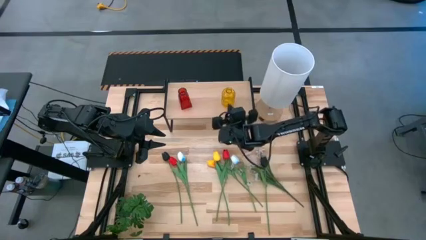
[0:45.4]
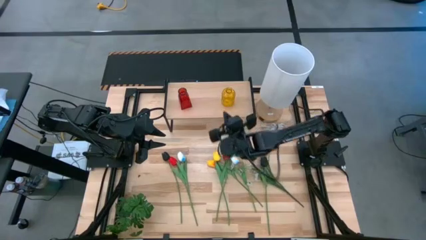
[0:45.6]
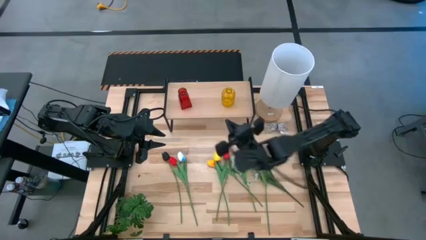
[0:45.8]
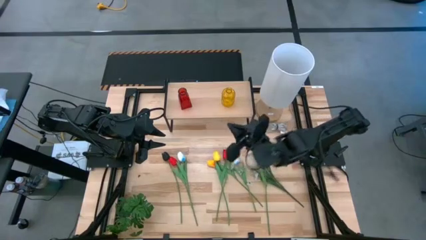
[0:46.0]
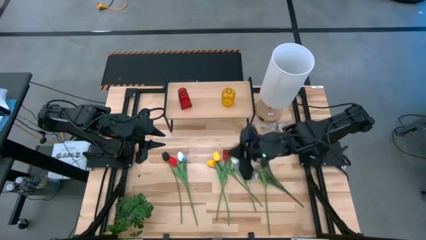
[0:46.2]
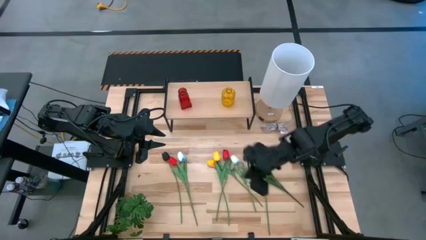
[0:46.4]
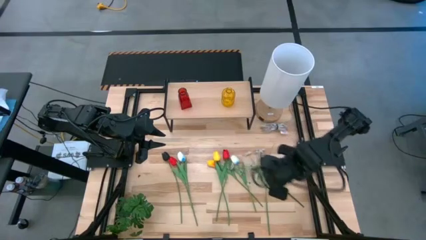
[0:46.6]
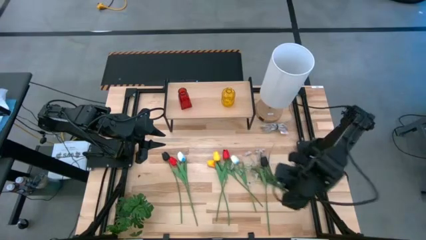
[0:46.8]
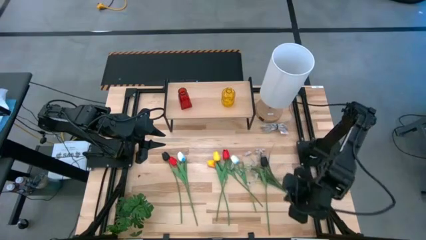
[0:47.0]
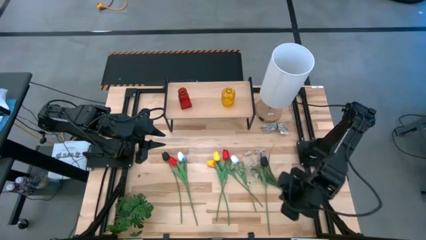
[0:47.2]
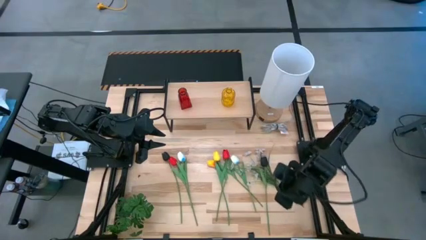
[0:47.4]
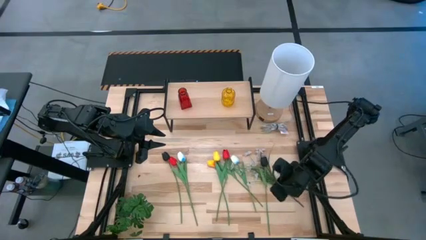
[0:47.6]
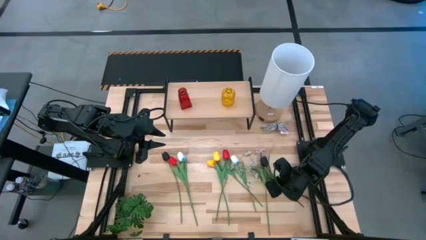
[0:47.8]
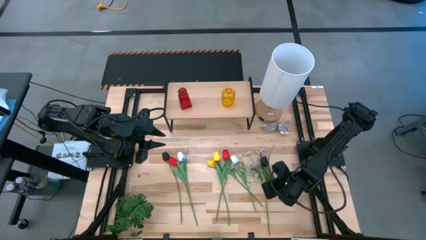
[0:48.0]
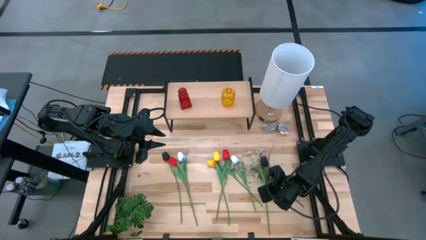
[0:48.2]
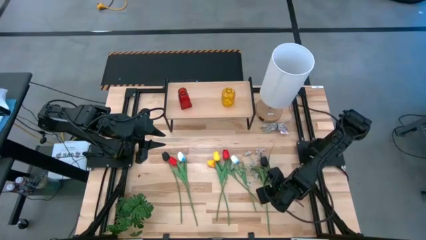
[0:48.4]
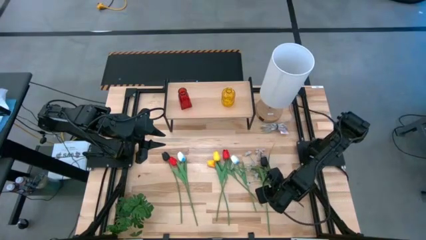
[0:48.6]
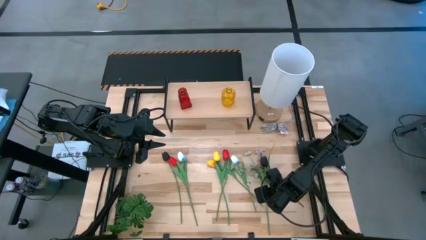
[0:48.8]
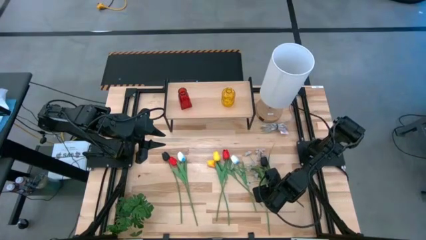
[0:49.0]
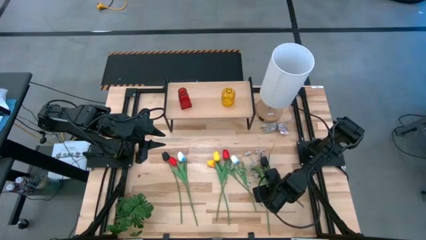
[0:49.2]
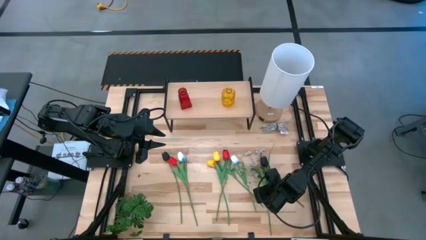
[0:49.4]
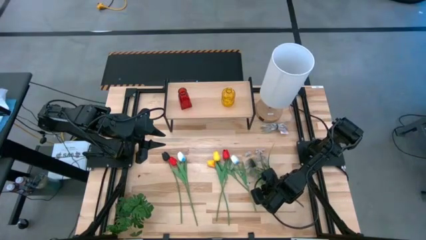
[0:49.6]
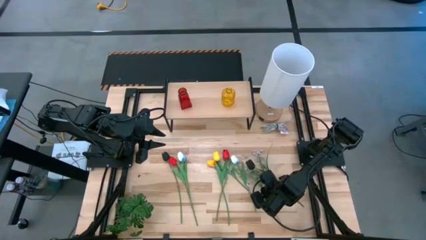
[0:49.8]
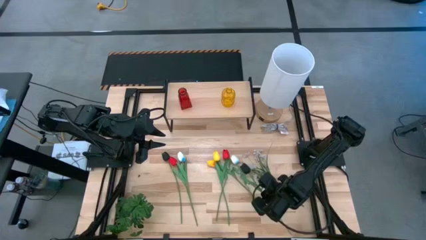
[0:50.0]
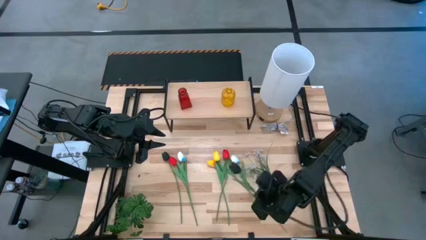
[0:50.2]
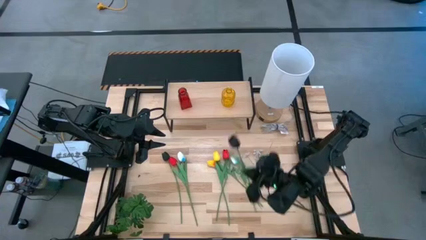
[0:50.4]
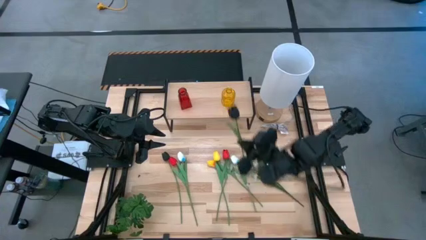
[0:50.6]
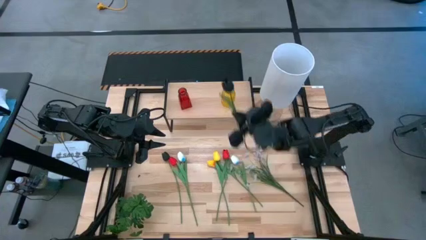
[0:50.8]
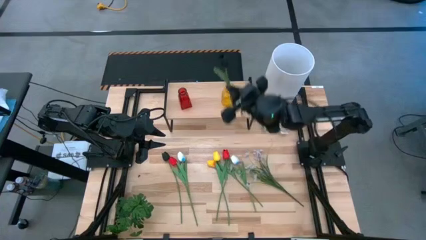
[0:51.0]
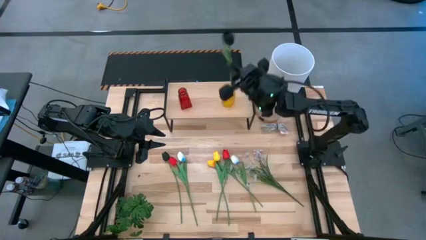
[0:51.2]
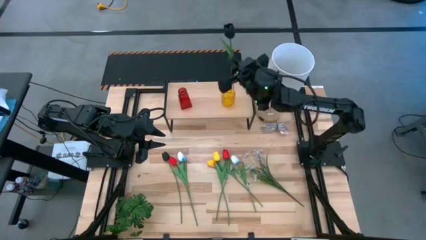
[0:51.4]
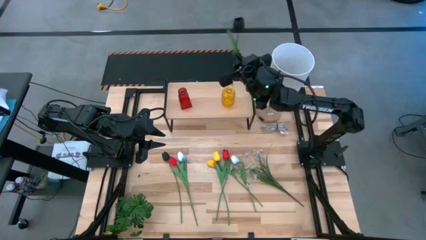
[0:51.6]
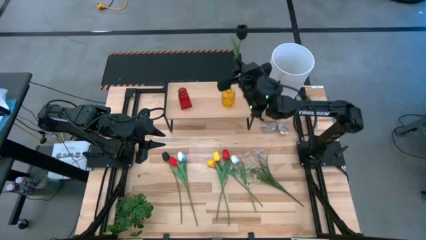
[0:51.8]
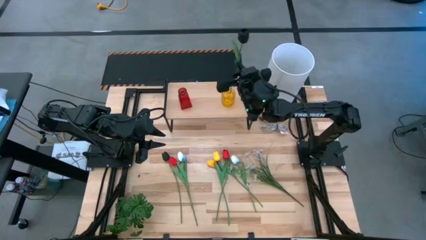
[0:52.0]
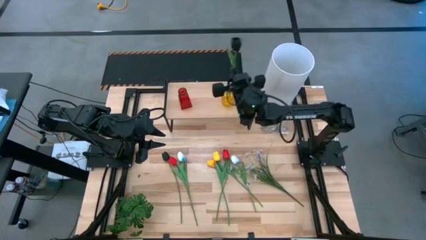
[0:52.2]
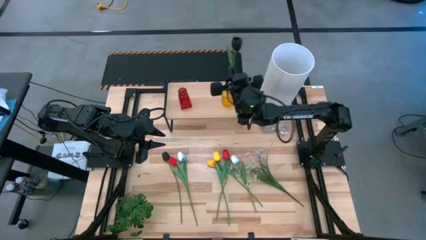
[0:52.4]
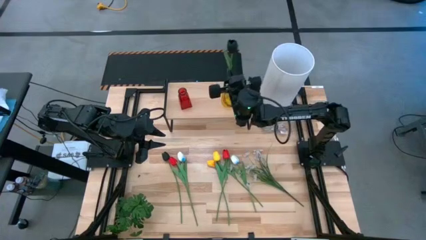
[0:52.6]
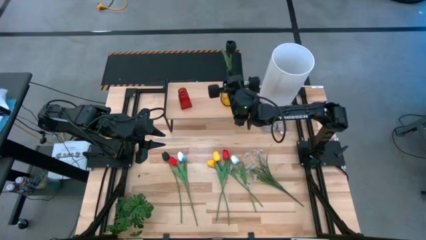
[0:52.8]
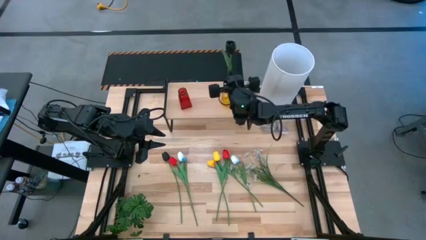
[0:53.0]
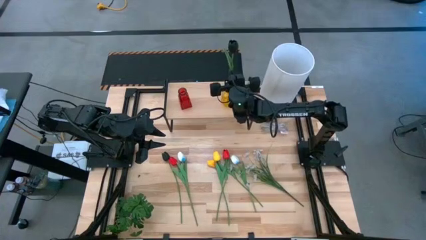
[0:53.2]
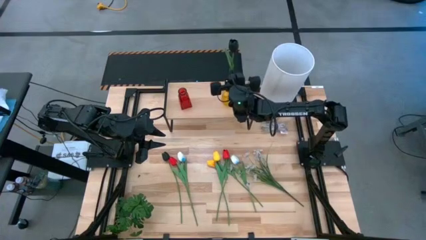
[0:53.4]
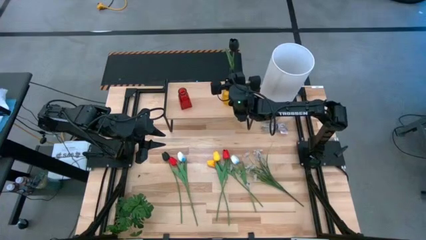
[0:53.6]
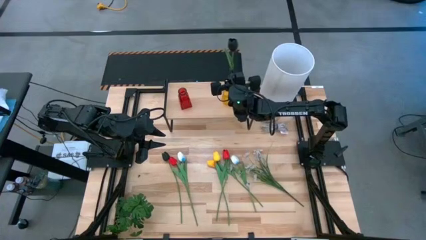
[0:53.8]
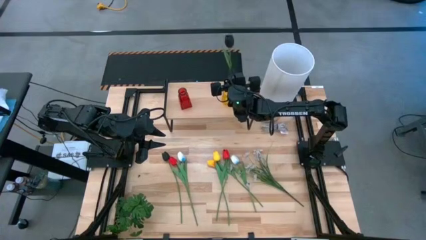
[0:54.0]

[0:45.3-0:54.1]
Task: Pick and place flowers into a vace then onto a shelf
Put the right black tulip into the yellow flower vase

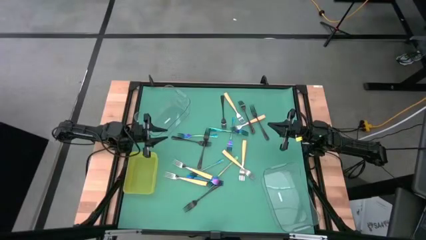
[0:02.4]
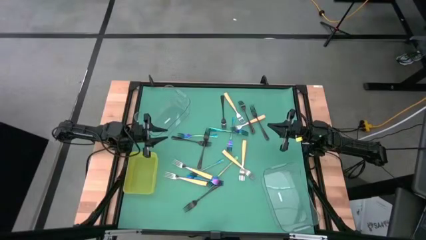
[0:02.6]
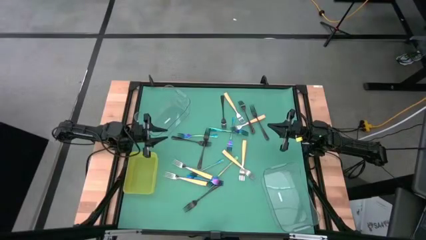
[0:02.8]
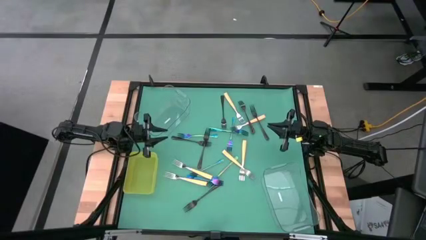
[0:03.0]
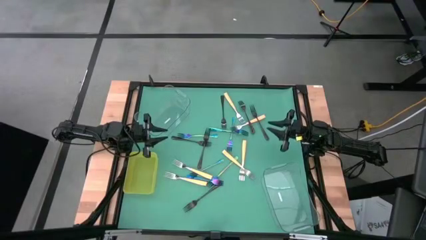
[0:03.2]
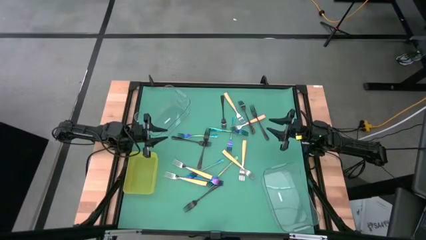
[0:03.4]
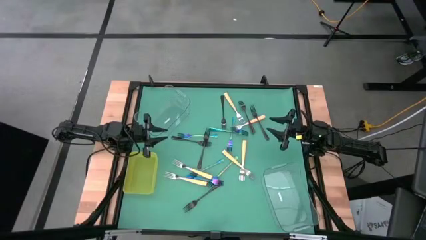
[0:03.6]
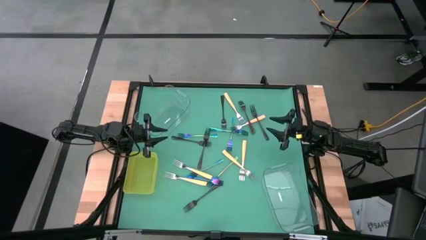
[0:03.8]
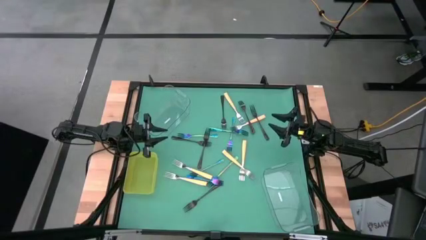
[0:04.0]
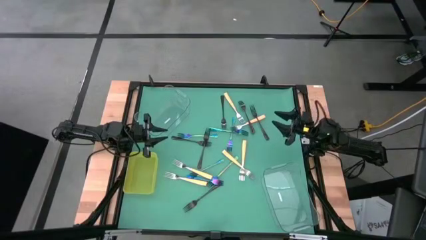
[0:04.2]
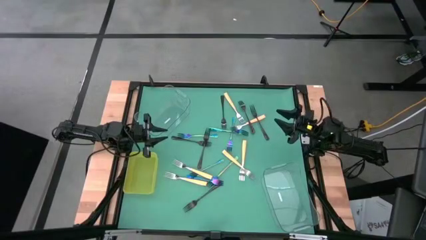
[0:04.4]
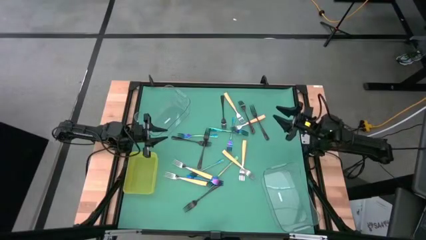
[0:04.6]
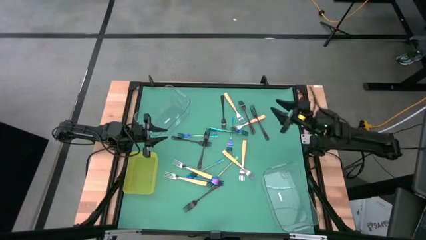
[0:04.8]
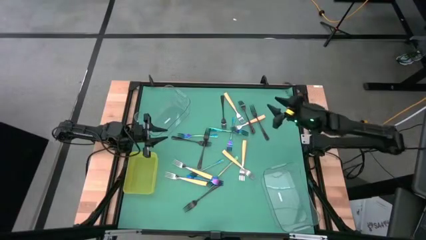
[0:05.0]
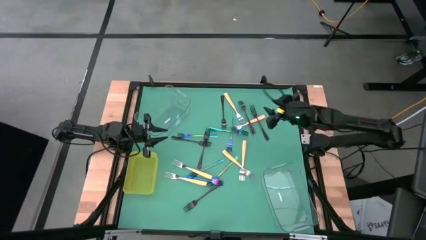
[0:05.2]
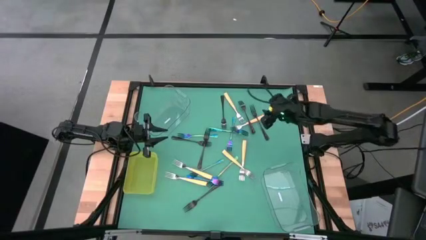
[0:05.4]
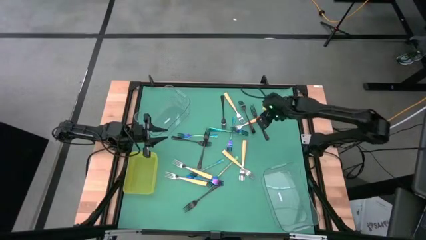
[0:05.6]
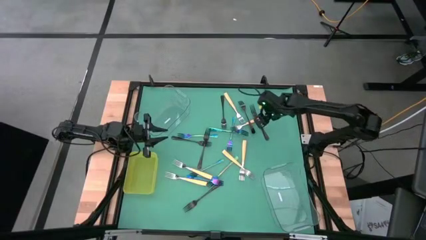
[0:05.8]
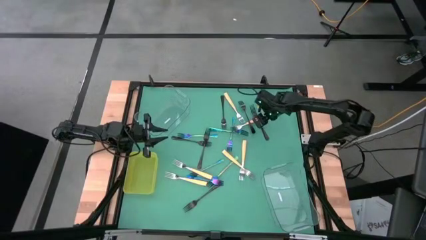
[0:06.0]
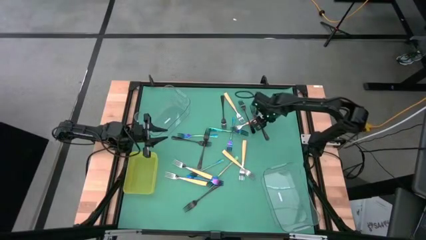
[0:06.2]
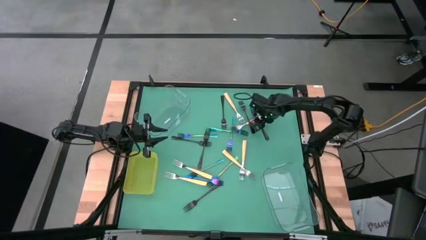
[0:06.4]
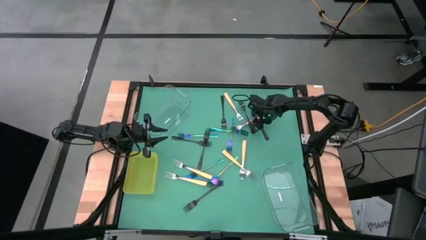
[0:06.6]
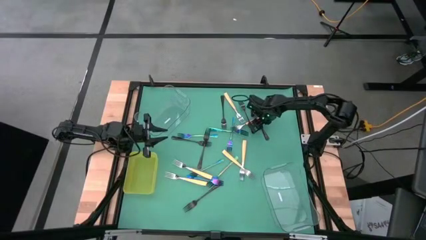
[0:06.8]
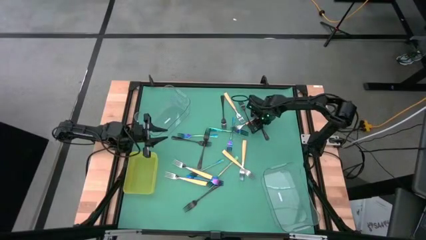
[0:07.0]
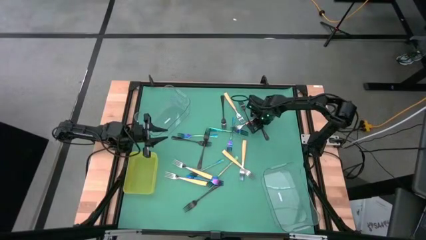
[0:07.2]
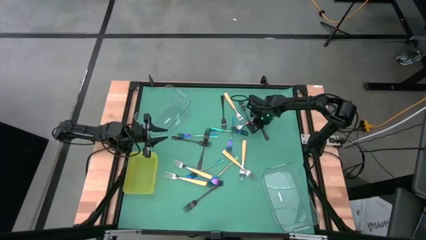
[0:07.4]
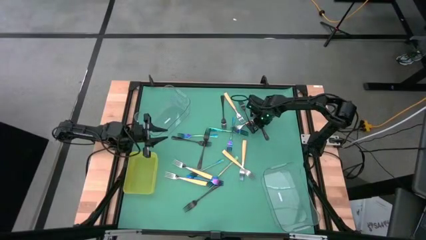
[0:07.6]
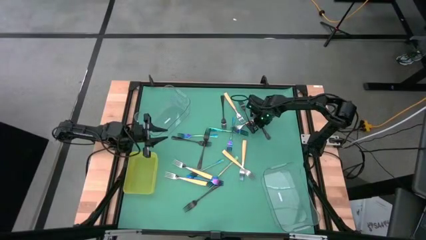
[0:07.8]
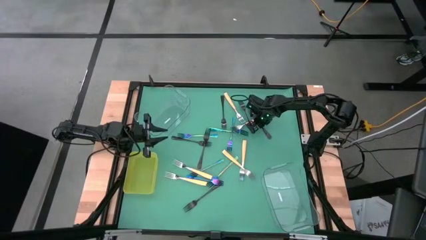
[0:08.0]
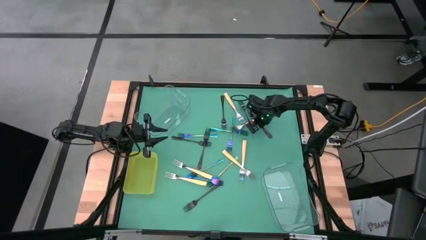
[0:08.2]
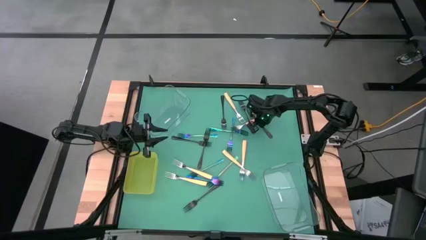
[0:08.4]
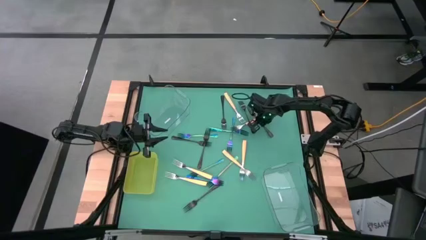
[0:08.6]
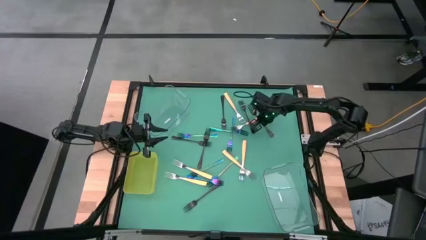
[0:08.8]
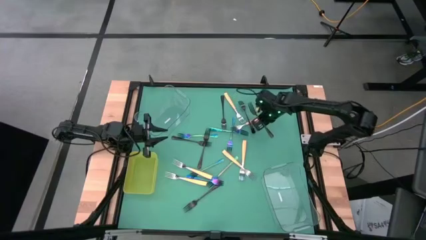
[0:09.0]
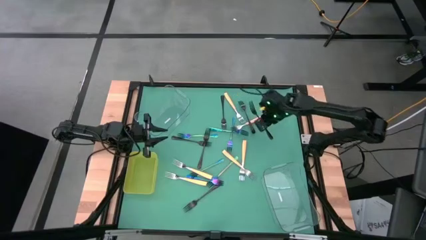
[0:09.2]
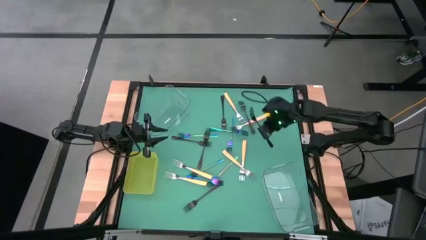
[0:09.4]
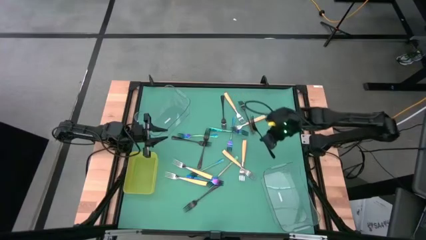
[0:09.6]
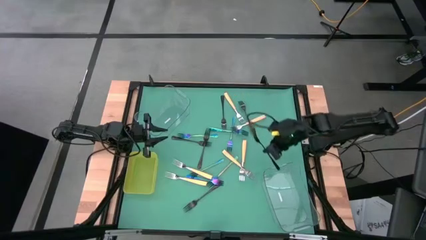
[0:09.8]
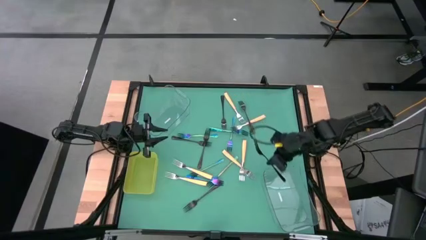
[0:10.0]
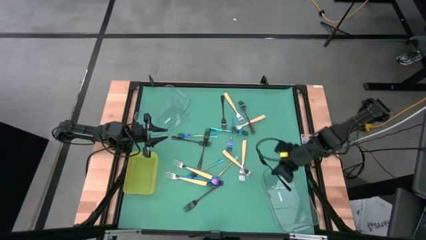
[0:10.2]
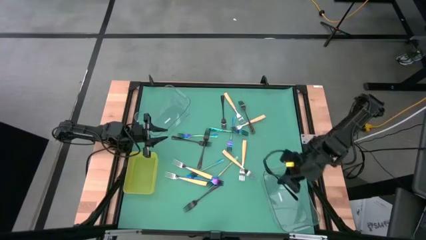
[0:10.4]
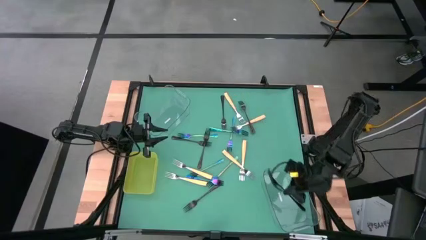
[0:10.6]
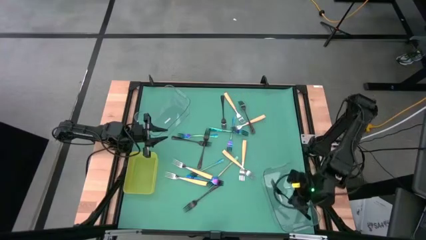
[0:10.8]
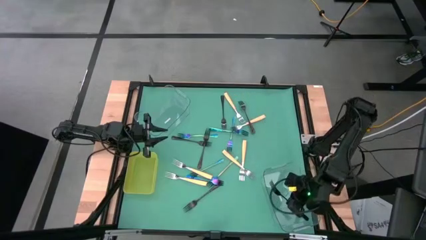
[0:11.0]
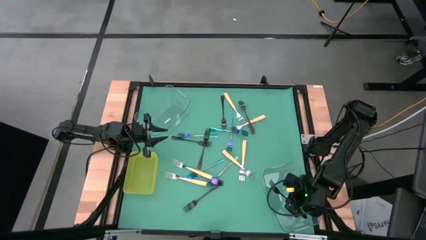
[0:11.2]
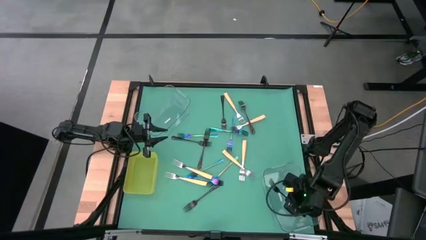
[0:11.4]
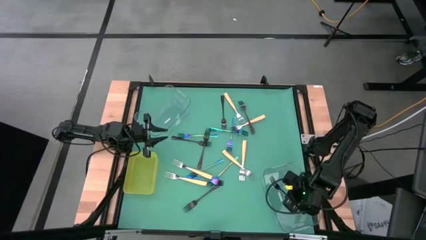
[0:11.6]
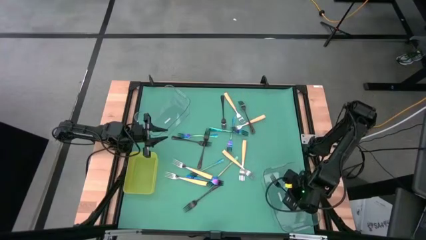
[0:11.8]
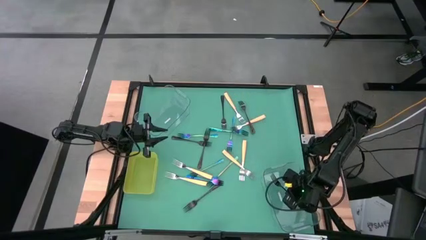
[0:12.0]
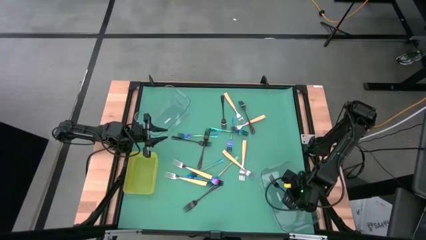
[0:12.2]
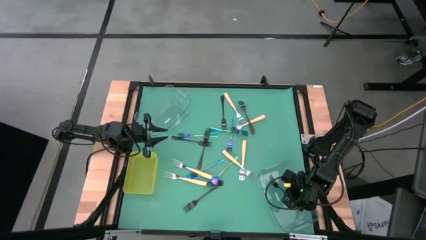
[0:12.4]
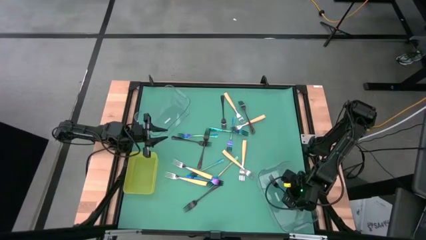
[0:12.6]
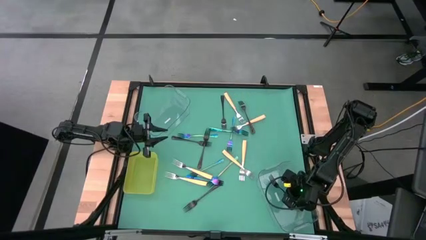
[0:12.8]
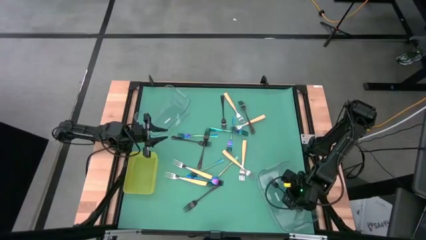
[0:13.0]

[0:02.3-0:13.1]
Task: Sort silverware by color (type)
Put the black fork in the bottom transparent bin
